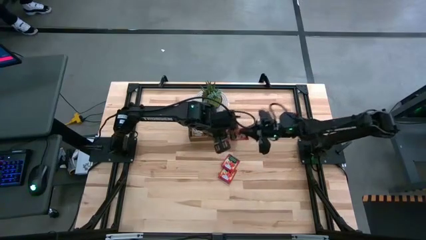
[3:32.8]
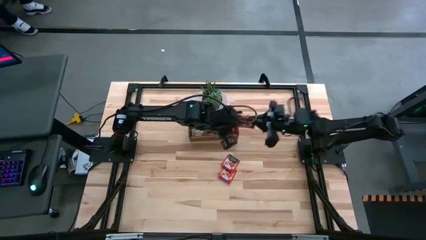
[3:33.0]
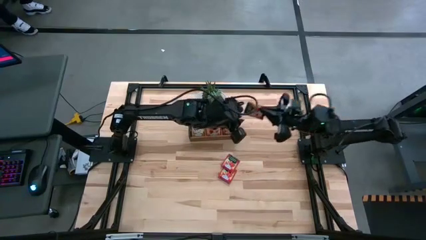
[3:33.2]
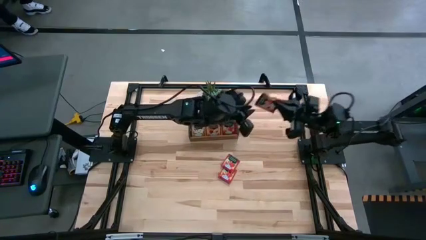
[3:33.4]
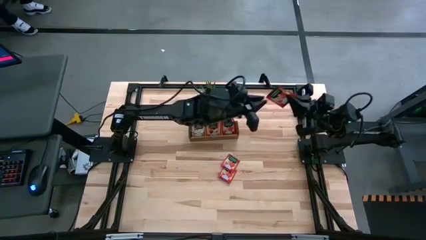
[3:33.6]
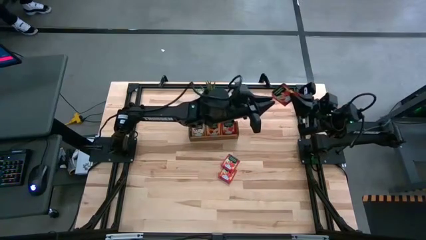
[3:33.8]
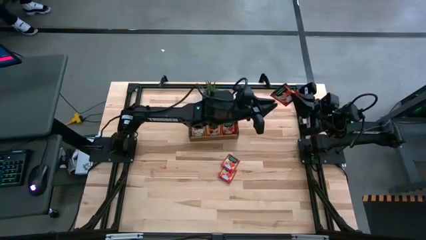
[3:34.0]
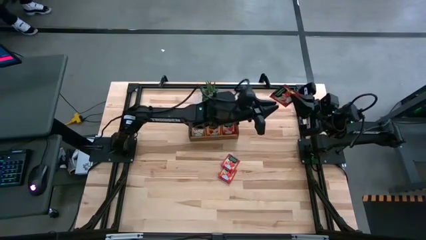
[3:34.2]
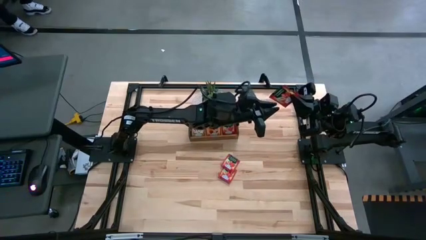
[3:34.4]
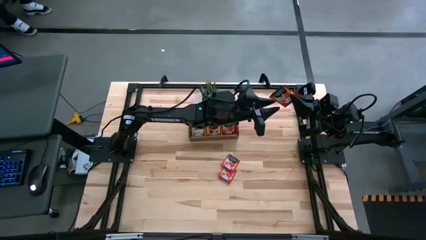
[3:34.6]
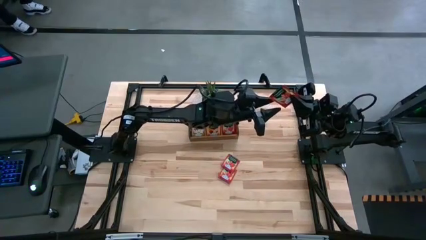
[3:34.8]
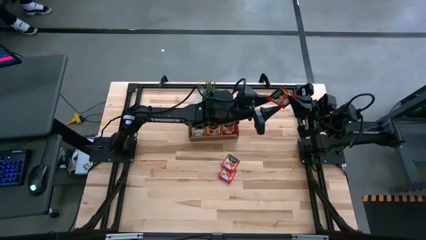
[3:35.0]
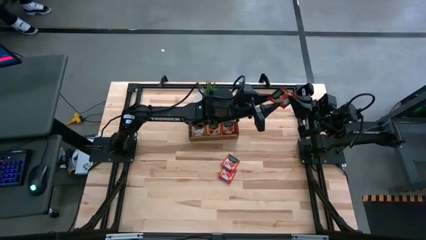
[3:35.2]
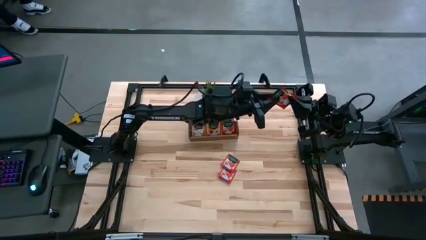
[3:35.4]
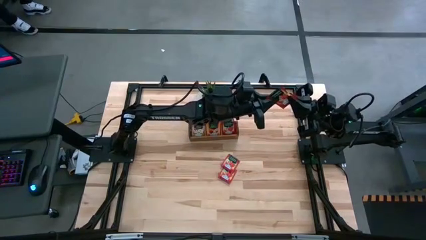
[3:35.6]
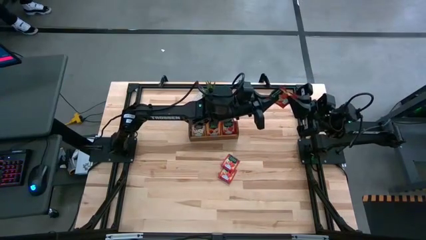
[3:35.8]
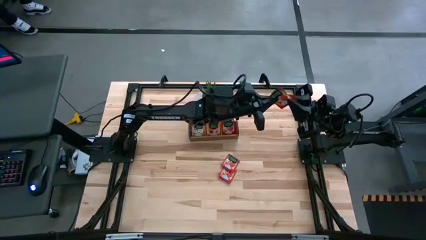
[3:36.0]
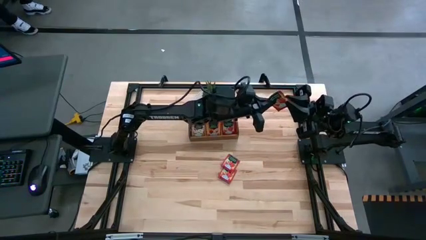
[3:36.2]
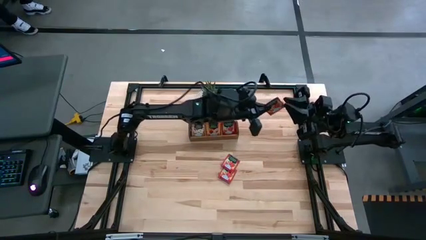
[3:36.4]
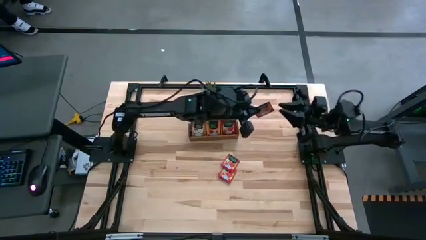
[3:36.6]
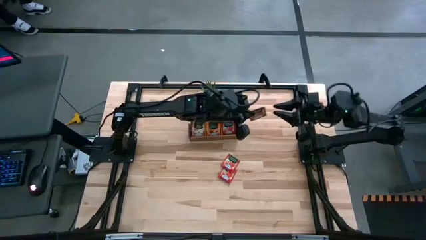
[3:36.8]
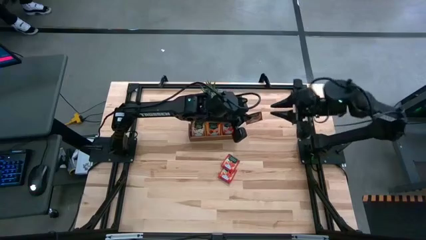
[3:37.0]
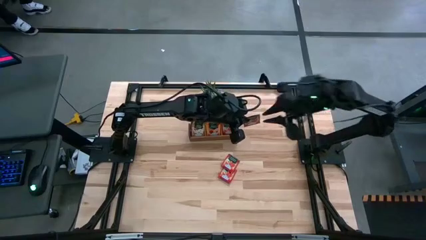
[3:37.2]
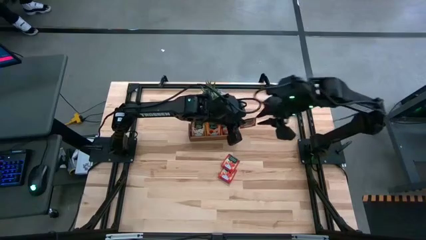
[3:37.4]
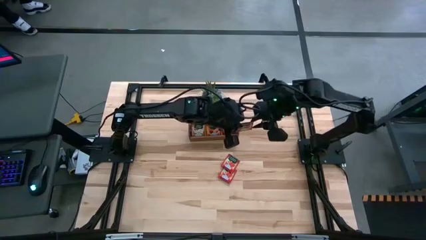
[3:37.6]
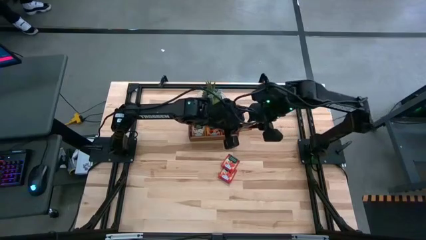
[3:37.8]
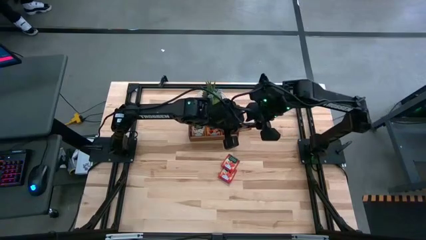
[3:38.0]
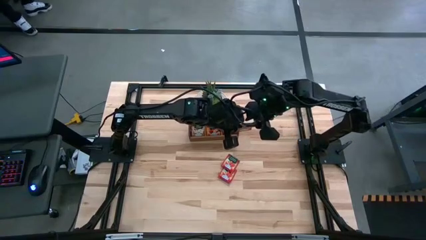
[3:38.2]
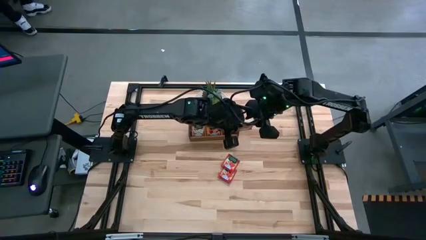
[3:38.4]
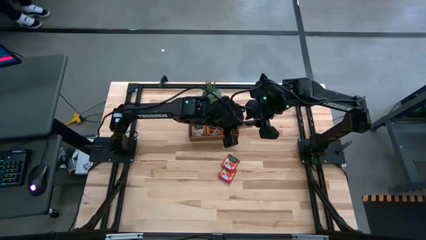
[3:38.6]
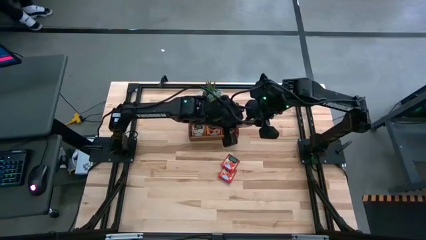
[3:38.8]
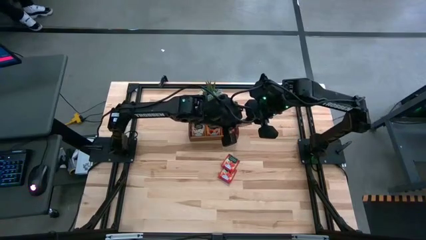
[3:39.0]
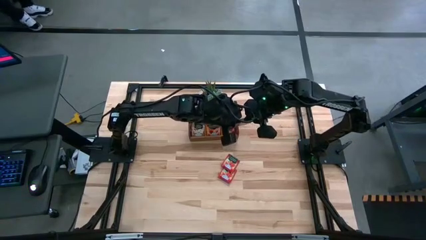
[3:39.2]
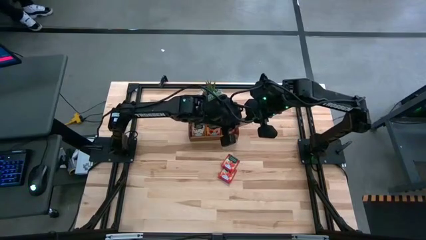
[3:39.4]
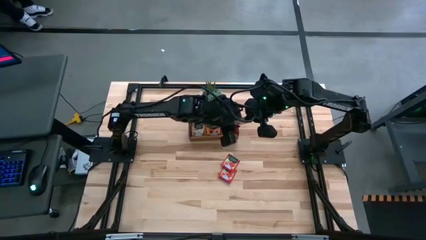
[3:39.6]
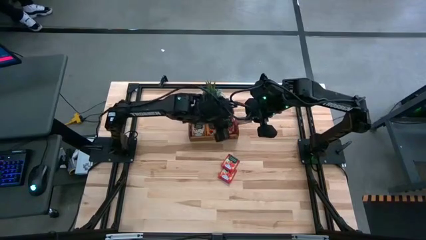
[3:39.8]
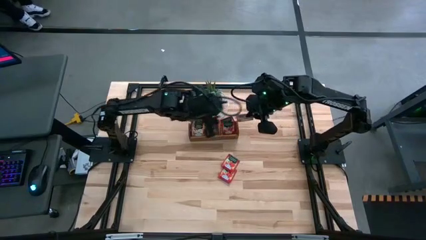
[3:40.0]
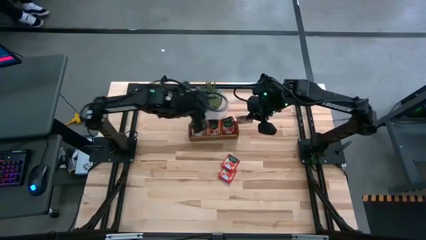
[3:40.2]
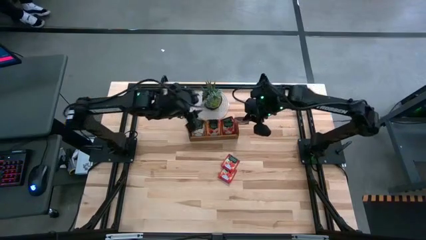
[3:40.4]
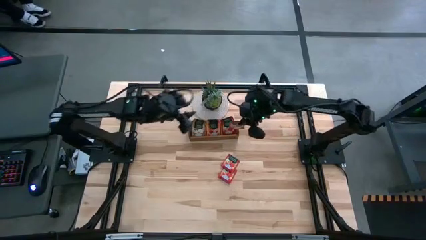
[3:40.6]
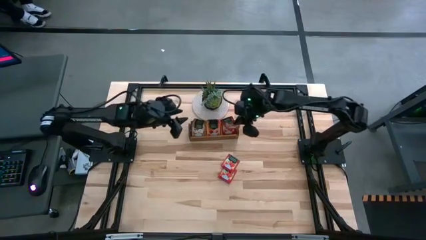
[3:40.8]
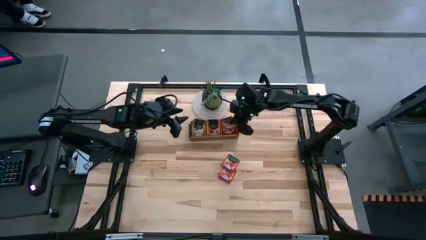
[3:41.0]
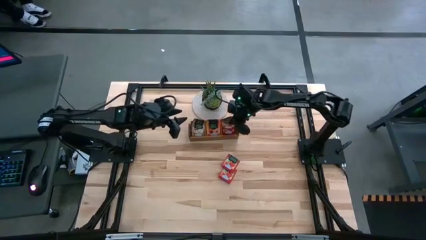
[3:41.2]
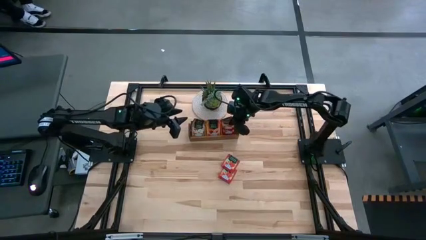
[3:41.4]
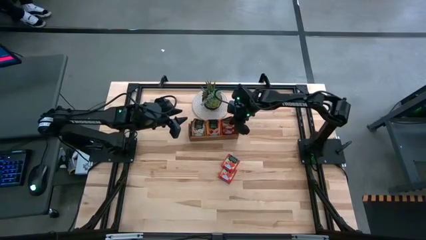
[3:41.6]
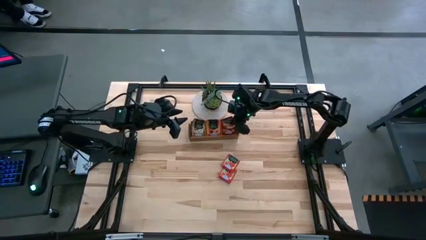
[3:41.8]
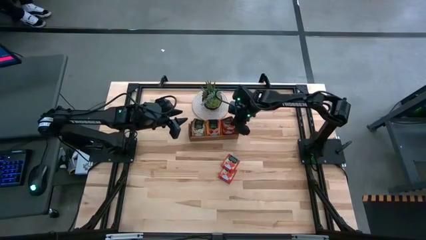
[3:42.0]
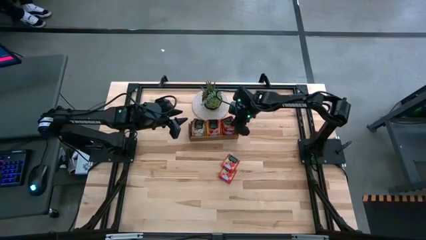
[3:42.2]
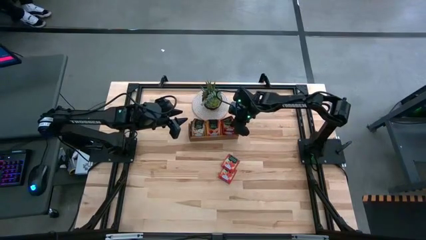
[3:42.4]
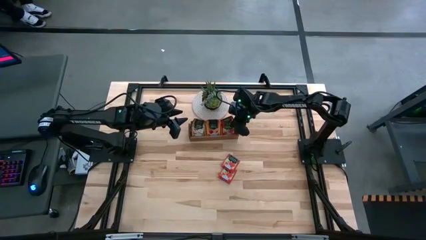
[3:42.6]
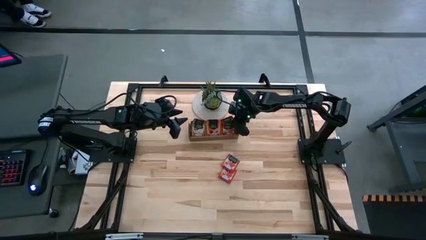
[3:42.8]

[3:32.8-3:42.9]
Task: Pick & Place Tea
Put the top red tea bag into the right section of the wooden organizer

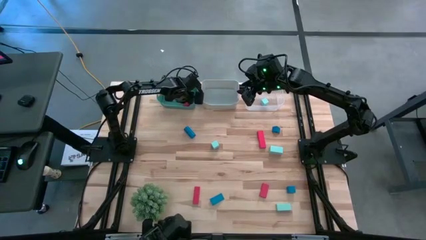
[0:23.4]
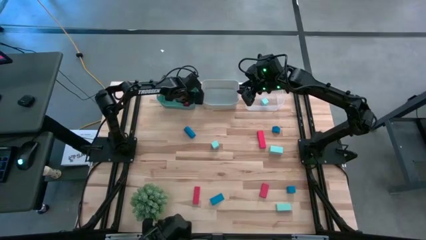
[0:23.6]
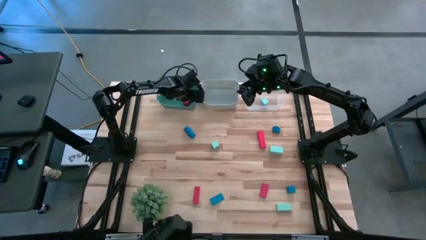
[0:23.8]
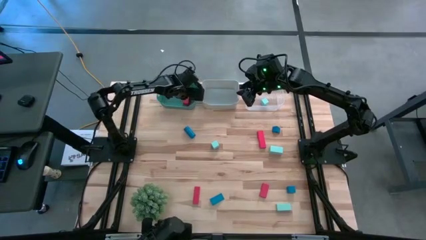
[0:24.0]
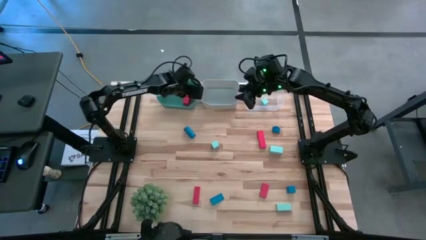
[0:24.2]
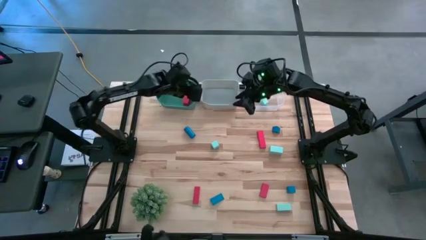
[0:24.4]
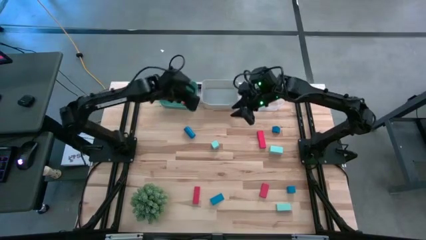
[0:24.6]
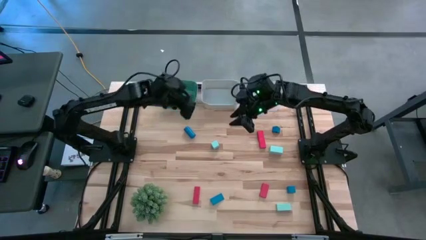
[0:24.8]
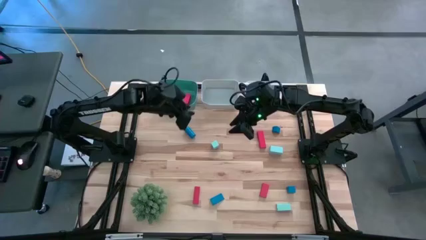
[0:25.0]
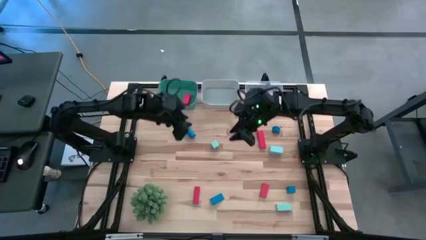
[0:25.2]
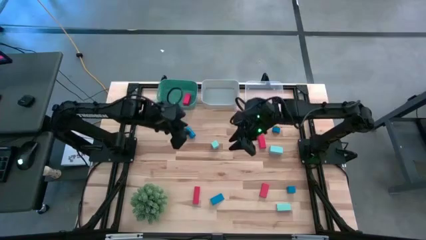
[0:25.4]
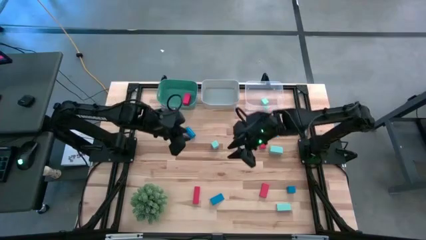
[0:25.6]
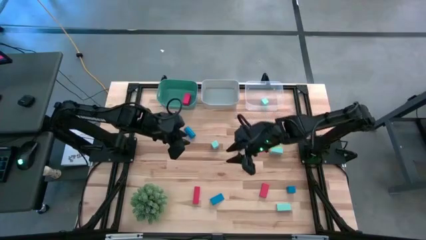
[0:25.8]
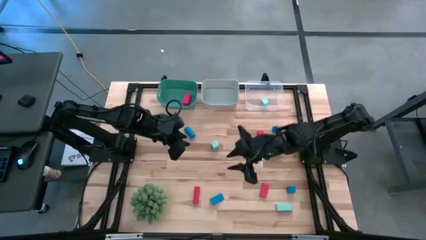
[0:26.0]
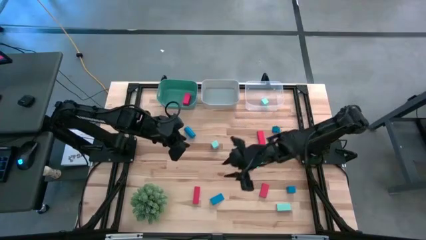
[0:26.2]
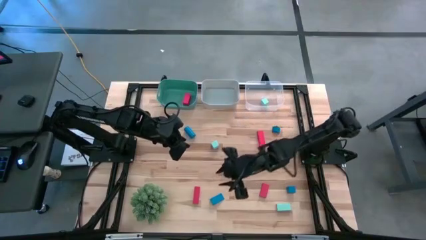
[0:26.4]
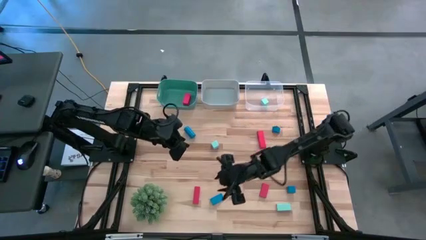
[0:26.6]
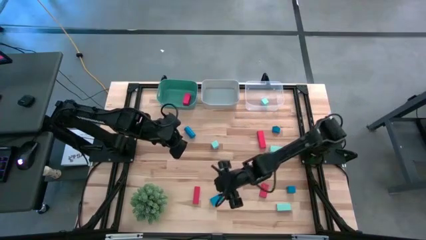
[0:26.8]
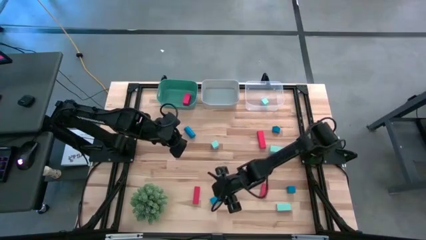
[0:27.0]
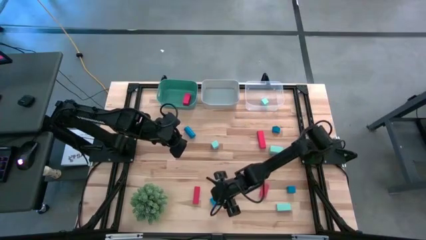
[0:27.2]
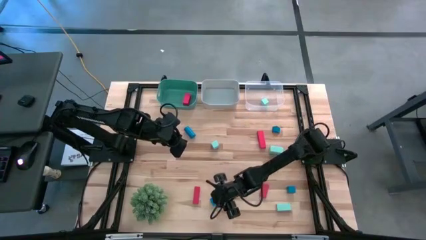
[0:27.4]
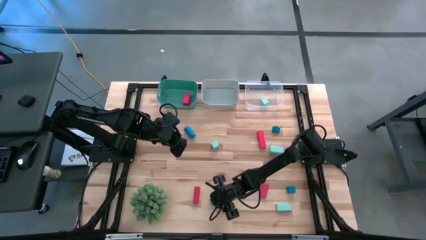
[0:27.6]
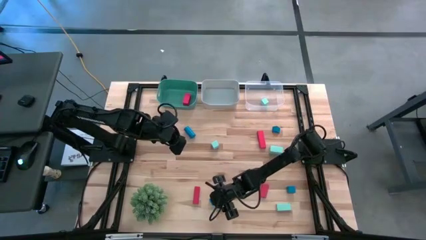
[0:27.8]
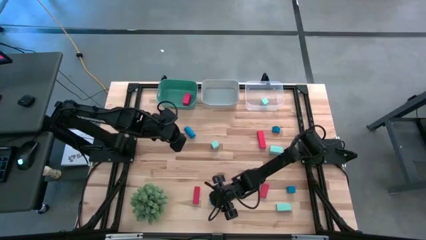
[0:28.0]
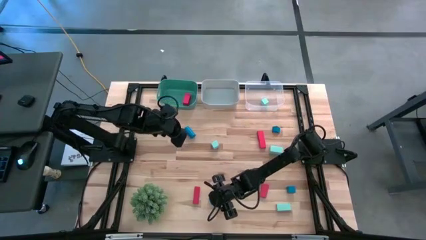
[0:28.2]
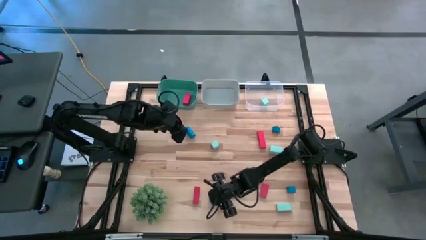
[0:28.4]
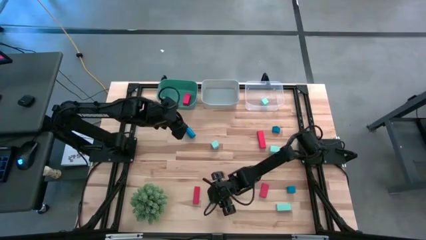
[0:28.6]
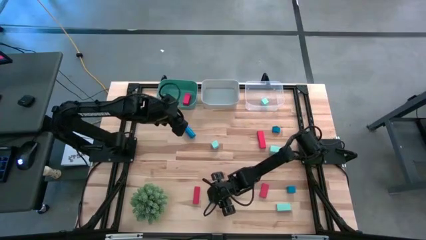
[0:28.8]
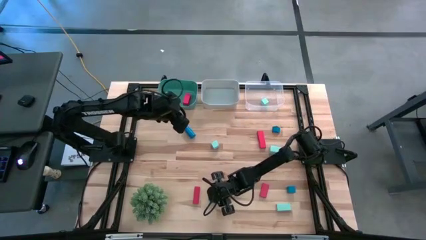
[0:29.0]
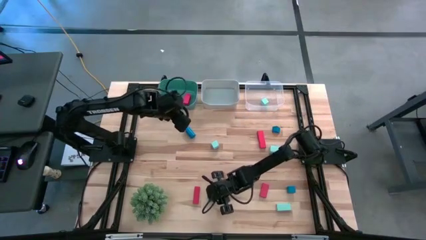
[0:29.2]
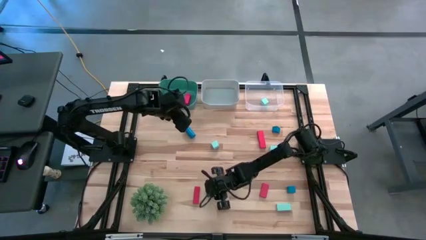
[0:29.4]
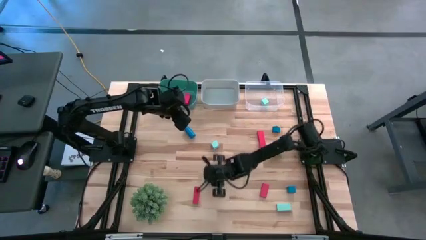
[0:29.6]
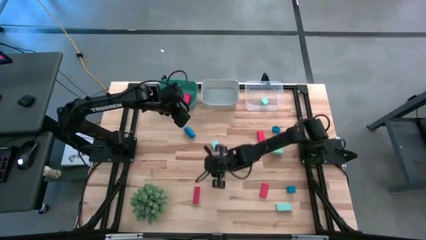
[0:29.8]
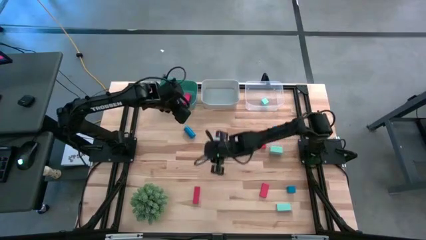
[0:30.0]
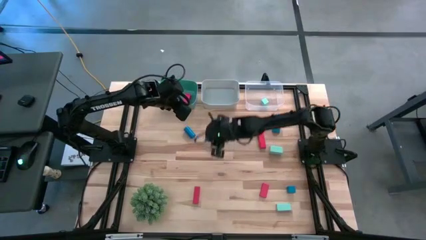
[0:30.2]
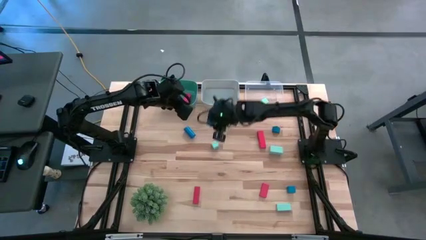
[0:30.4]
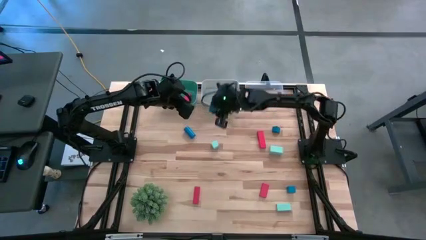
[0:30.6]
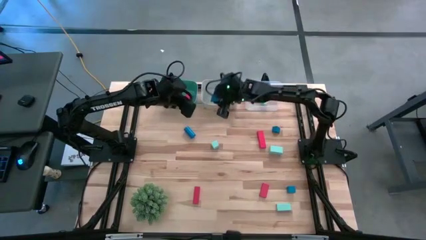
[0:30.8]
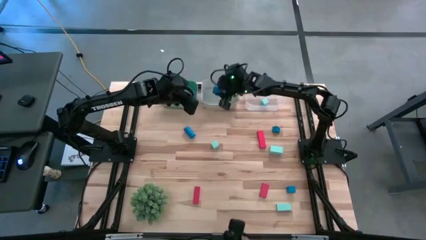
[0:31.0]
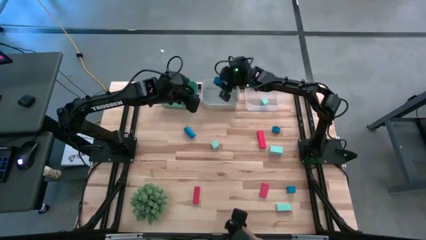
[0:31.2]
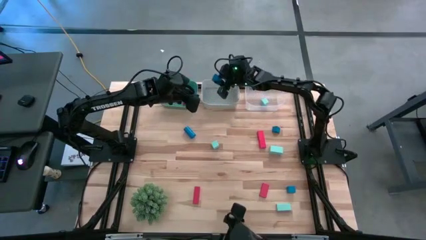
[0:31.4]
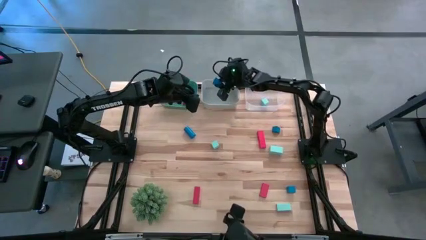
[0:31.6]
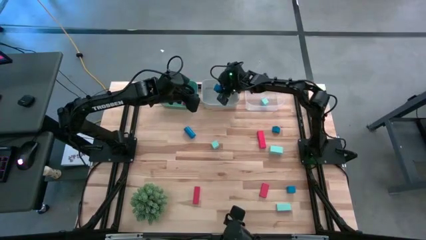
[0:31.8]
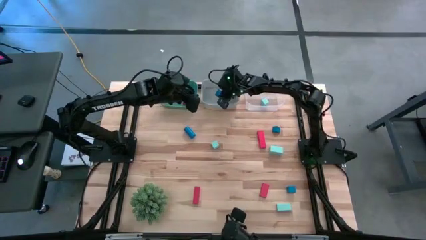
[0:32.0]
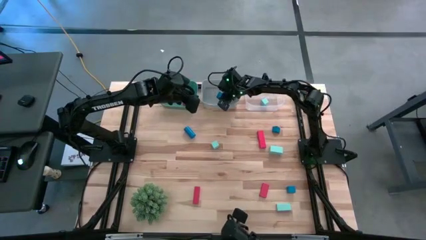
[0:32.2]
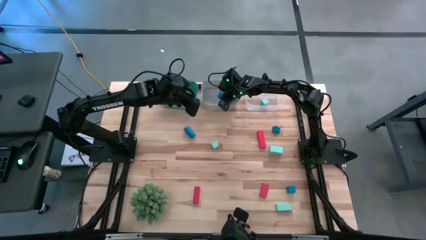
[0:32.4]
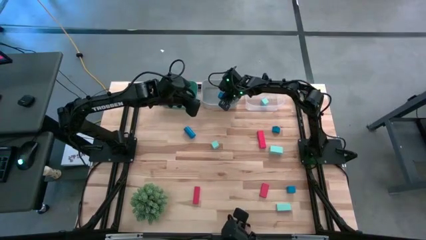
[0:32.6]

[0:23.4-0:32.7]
Task: Sort & place blocks by color
Put the blue block into the top gray bin
